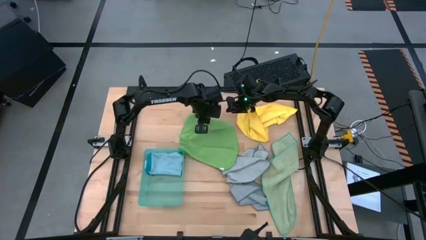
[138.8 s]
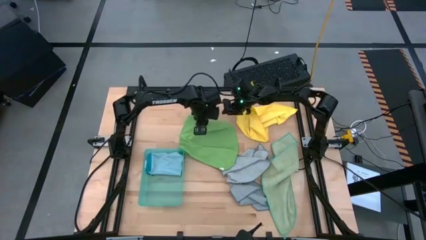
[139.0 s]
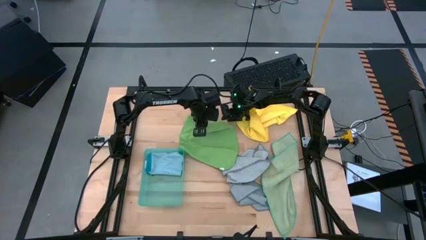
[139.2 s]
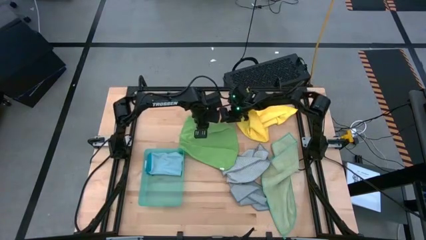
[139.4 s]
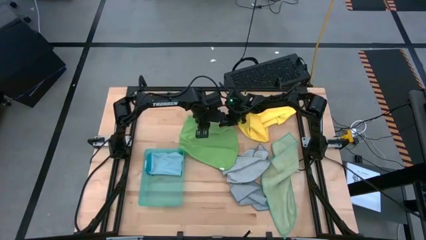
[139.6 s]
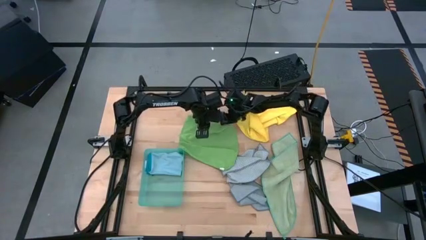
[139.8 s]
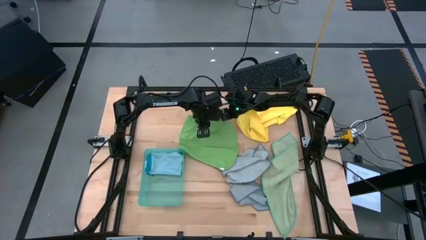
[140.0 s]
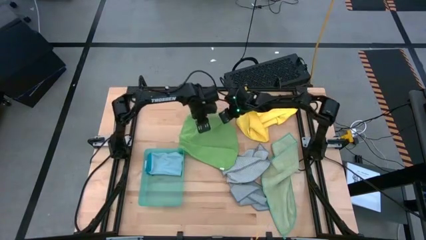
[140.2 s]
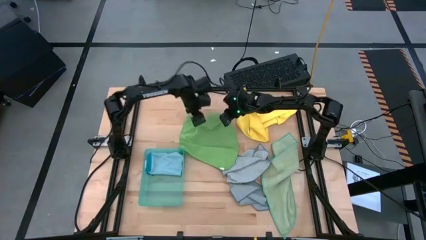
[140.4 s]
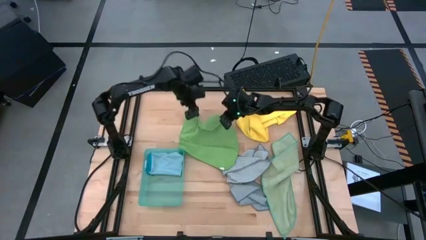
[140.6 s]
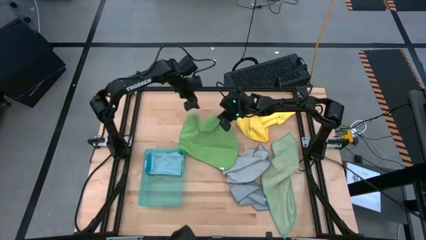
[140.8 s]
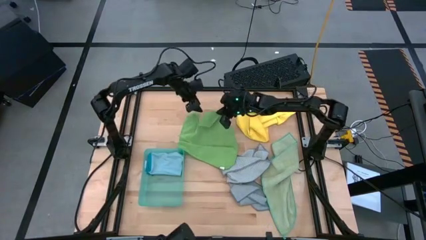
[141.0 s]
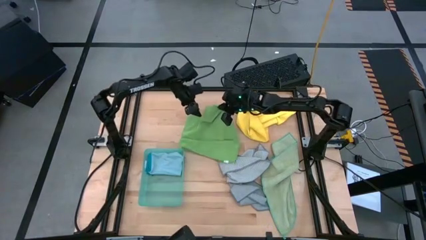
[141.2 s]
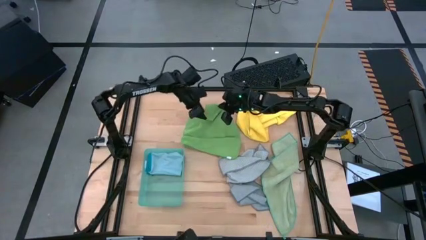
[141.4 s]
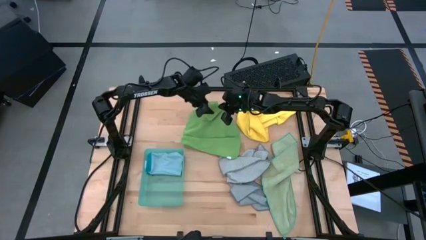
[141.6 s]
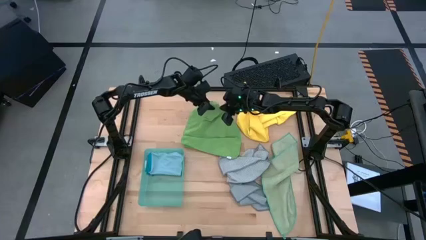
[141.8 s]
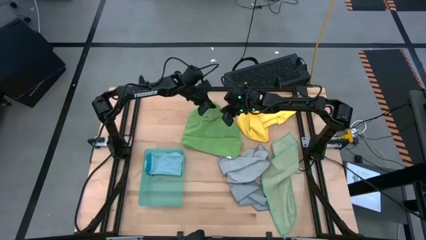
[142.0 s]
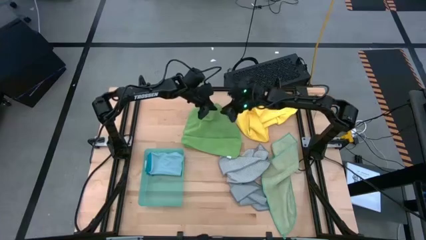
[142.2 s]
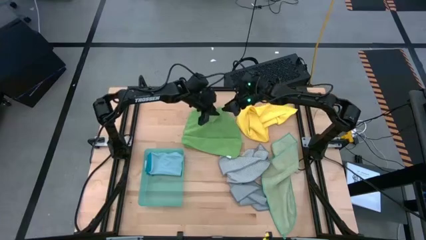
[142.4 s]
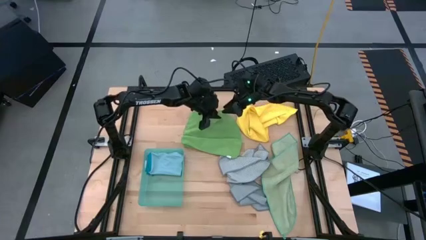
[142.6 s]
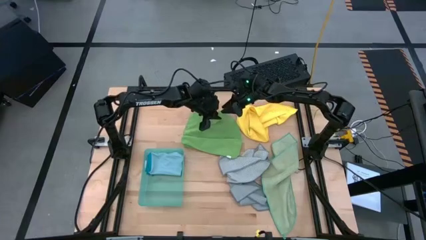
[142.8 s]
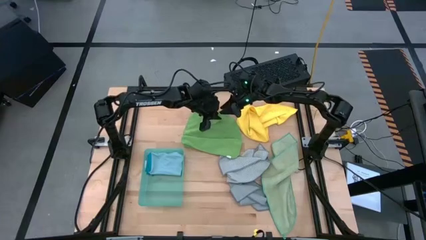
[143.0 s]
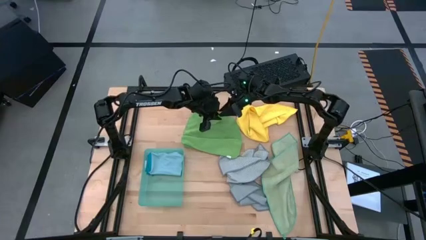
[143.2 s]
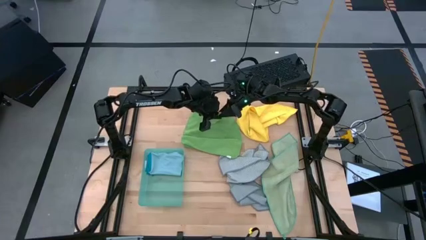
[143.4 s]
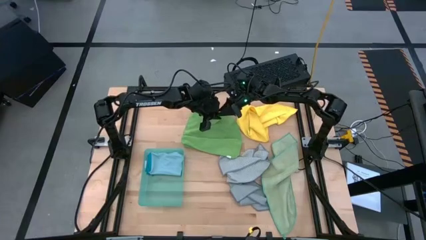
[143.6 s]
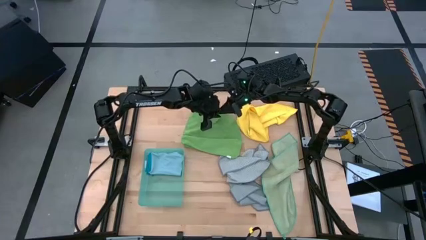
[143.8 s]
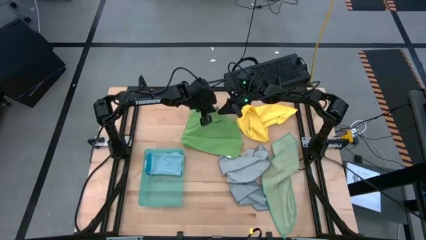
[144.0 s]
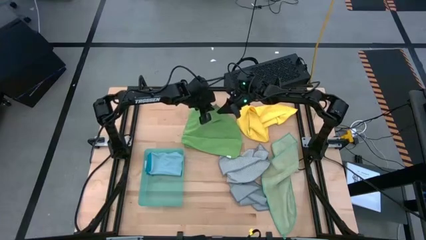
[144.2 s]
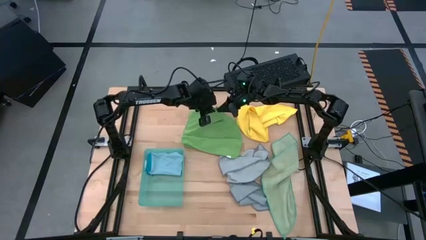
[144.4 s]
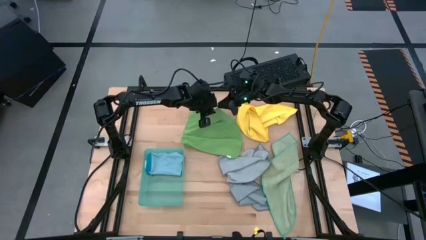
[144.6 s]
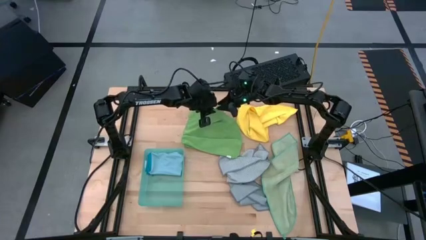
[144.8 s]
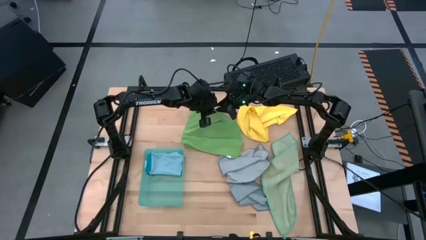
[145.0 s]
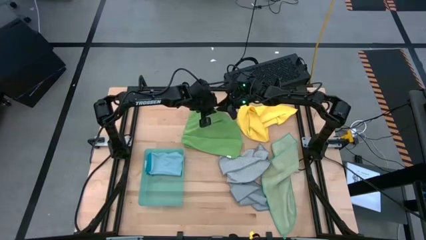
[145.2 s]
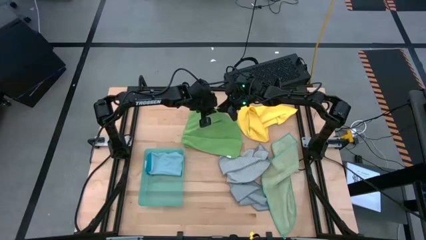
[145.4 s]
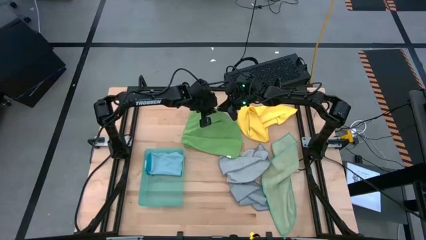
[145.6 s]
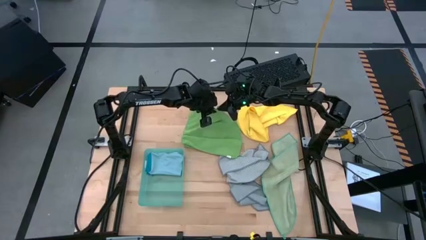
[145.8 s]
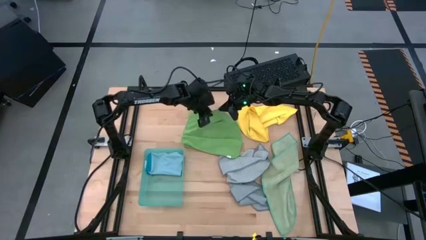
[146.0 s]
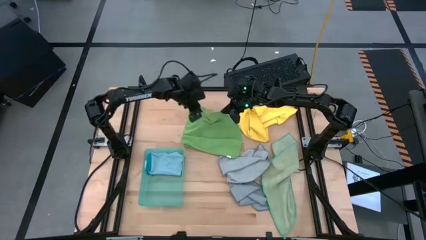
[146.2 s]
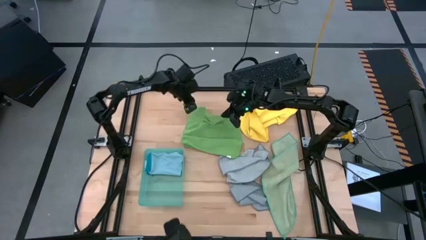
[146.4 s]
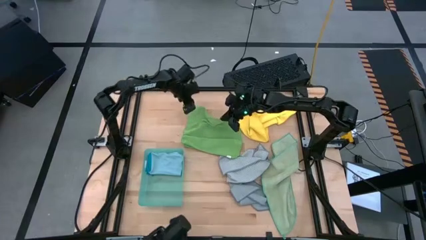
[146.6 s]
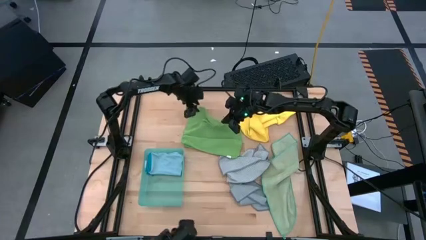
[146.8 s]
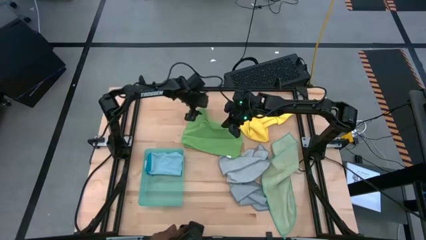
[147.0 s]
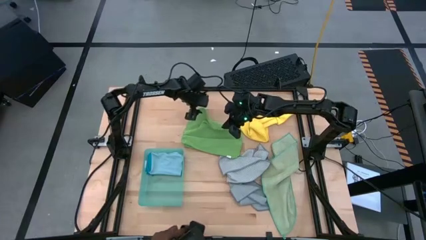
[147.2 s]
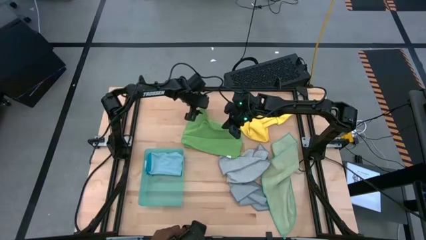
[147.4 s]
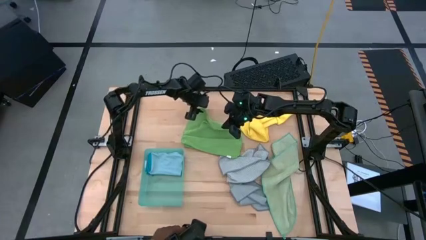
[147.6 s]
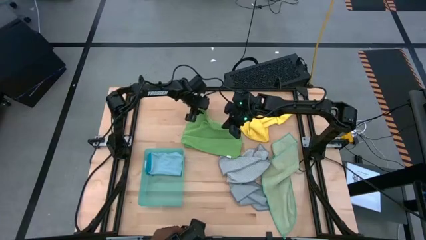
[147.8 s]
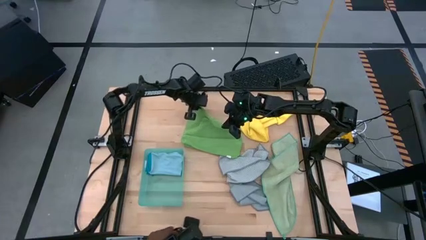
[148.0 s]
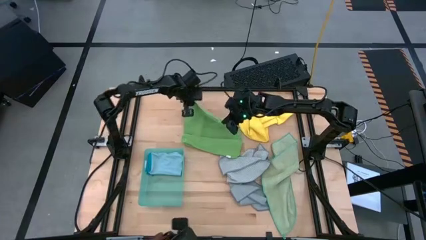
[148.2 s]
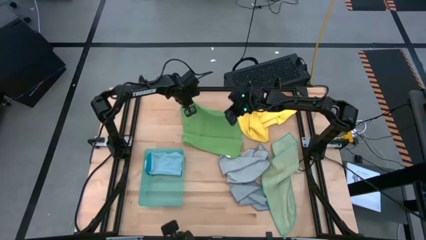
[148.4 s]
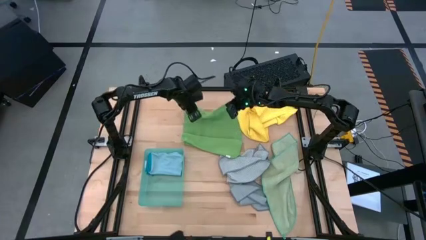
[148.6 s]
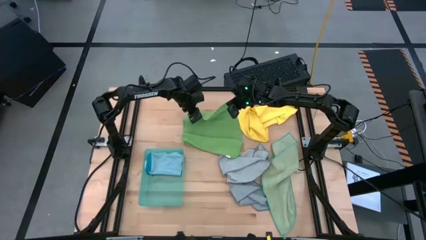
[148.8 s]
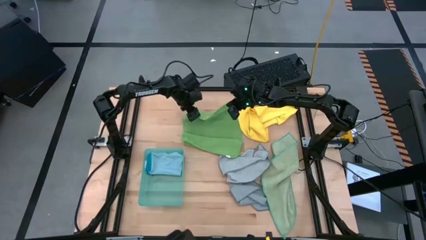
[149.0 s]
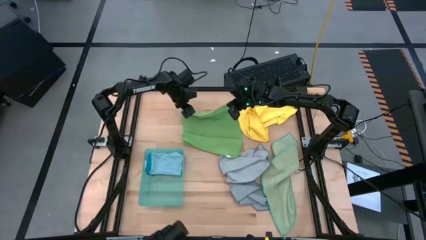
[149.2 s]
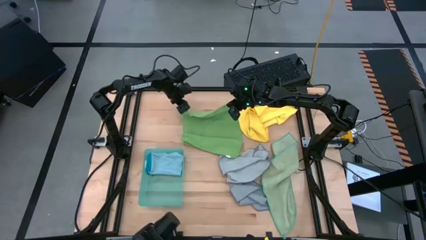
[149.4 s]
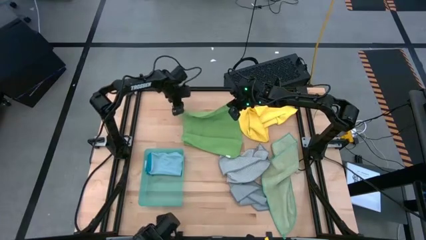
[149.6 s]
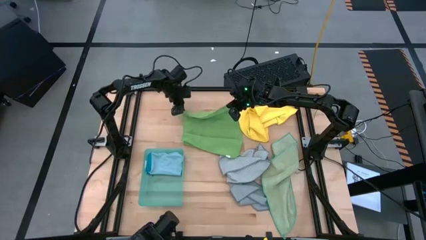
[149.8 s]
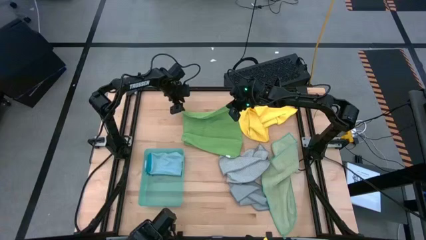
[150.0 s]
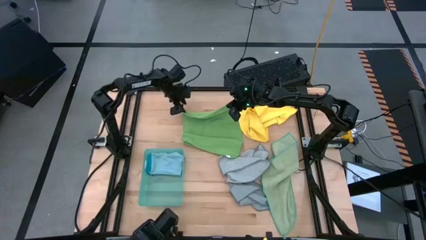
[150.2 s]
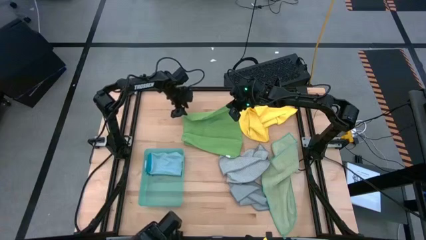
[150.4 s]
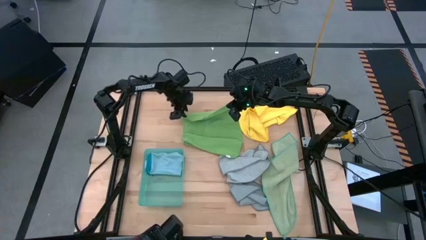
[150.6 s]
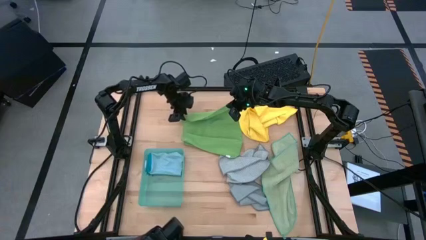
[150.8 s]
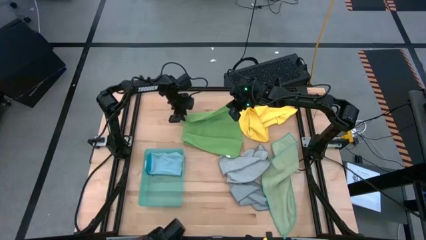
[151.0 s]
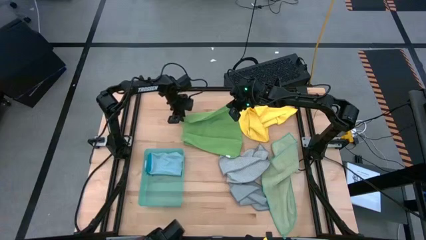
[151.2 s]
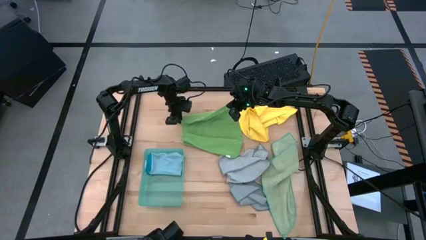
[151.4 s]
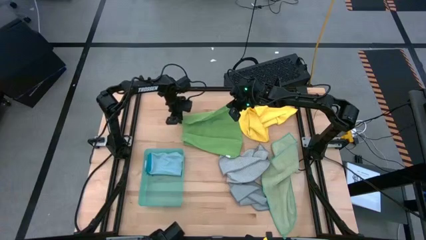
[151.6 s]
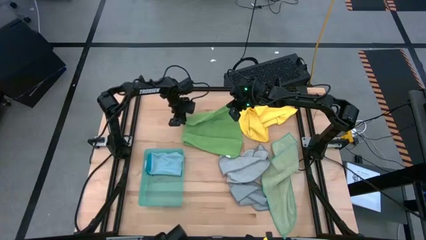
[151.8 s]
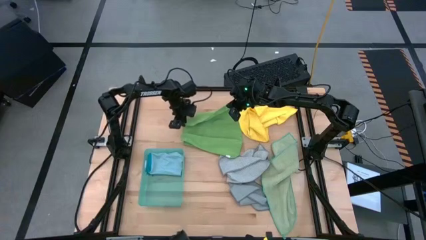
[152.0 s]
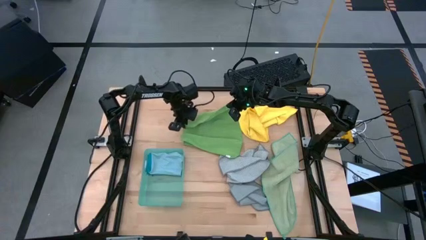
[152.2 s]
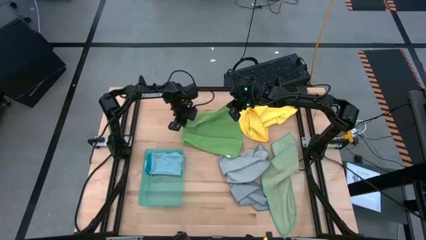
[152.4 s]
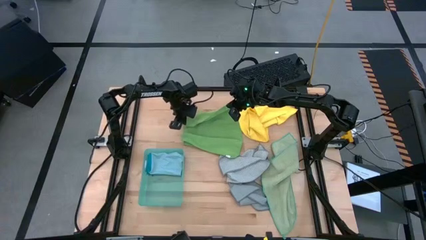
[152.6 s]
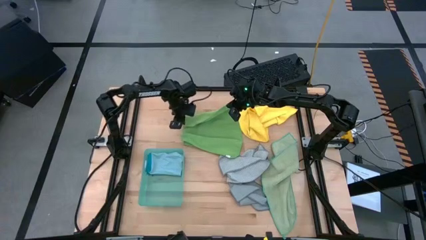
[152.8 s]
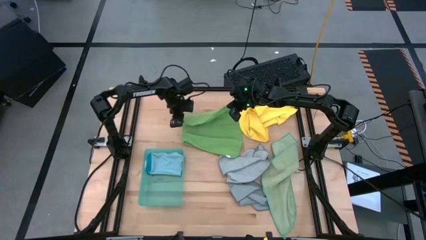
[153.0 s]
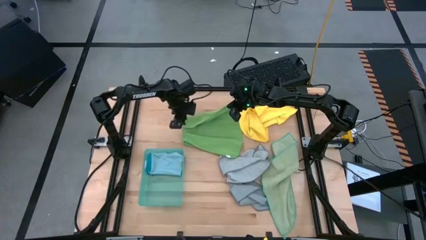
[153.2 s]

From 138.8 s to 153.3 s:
Task: Fold microfiber towels
Fold the green microfiber cloth

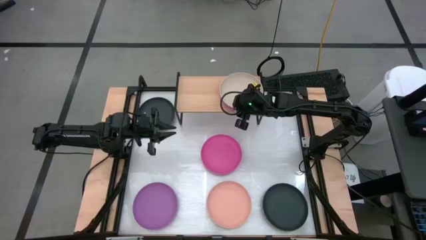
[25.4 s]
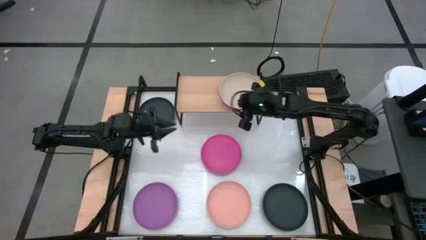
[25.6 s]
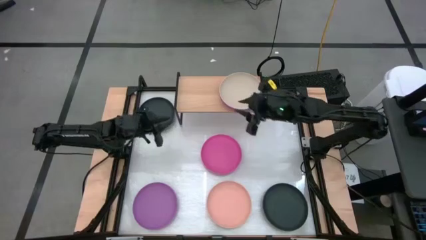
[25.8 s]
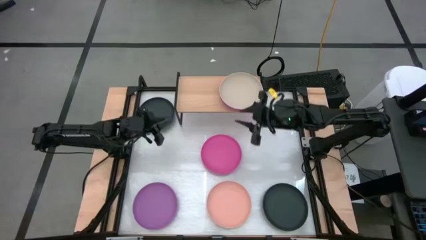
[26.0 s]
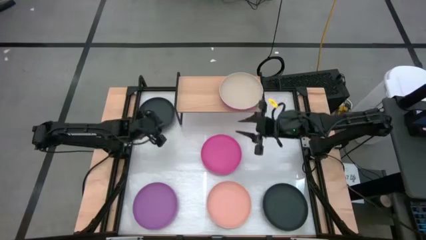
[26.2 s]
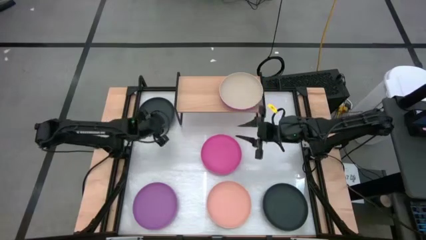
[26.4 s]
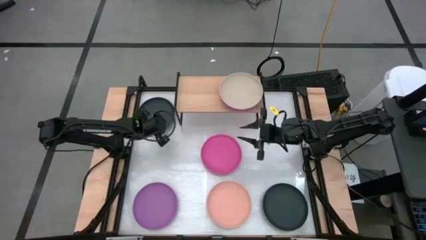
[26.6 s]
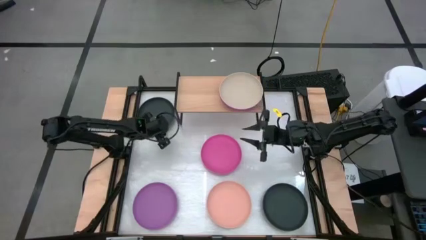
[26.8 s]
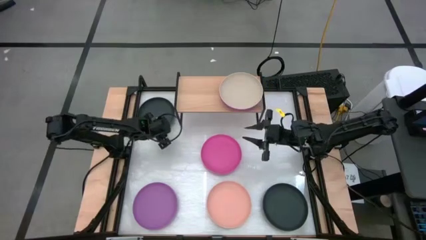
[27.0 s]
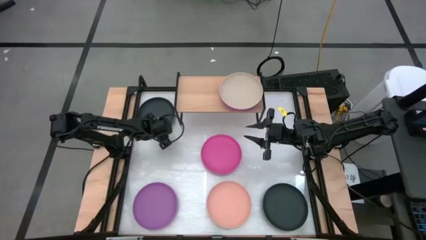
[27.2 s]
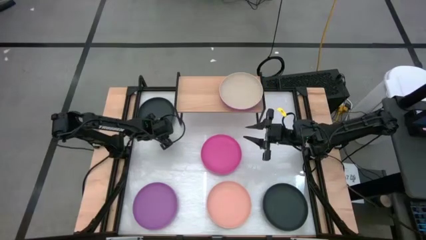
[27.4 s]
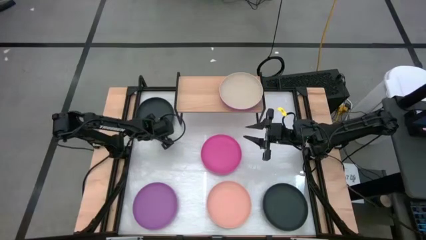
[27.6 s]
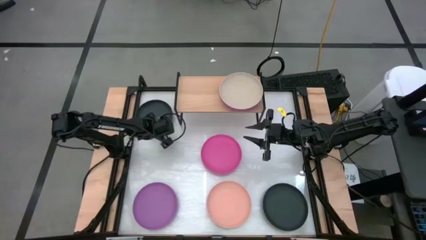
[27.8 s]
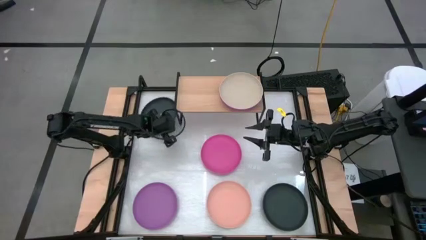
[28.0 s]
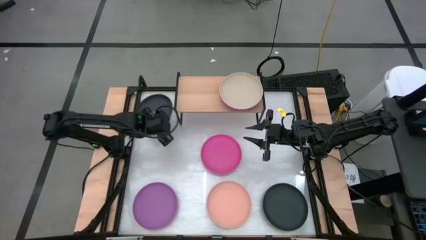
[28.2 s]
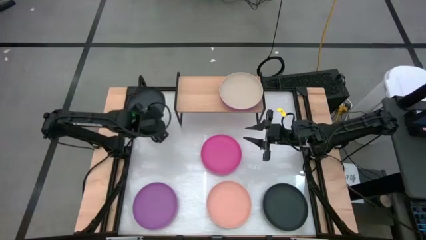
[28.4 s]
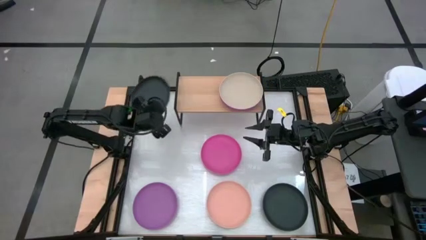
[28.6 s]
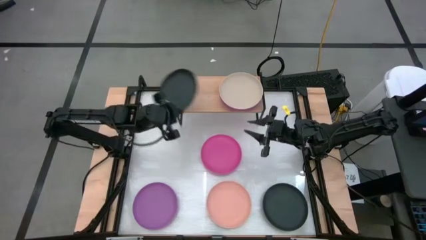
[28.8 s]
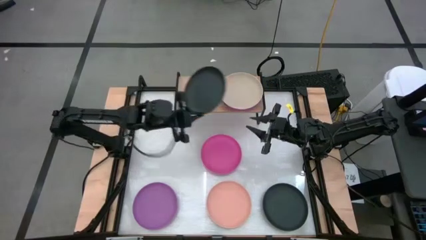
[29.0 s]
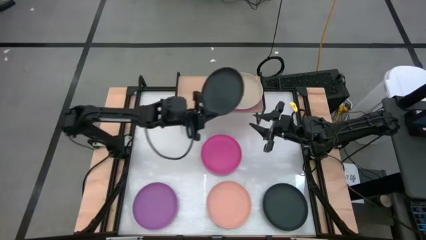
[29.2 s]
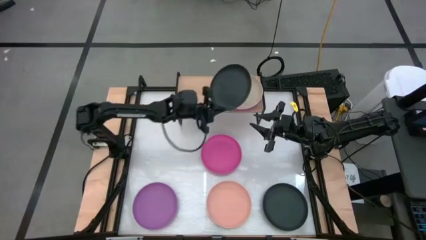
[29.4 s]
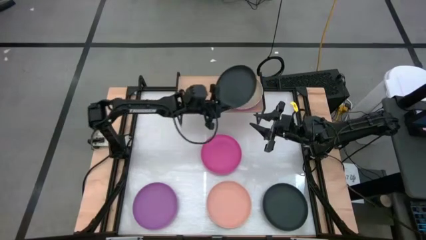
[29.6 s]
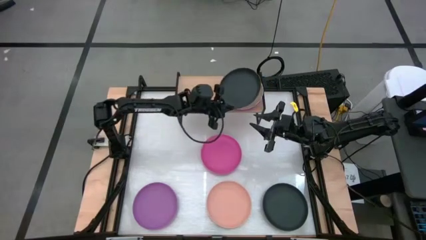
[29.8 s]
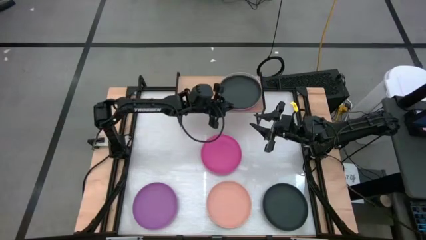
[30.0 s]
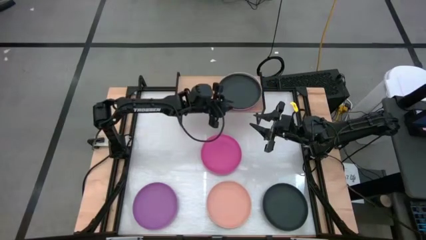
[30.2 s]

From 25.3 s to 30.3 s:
Task: Place and stack plates onto a shelf
Stack the top black plate on top of the gray plate on the shelf
